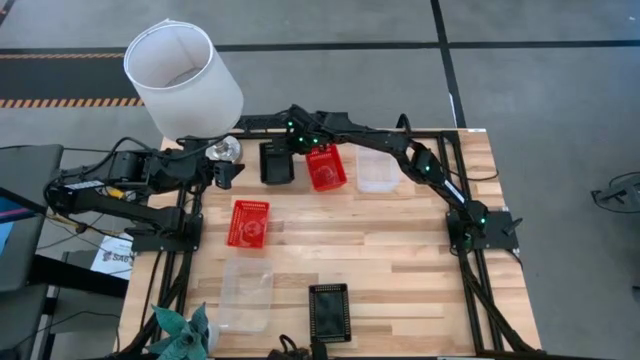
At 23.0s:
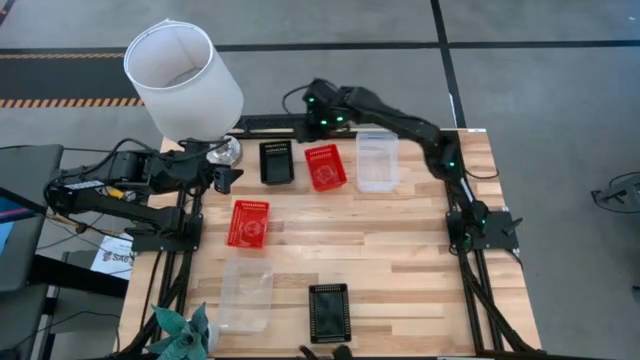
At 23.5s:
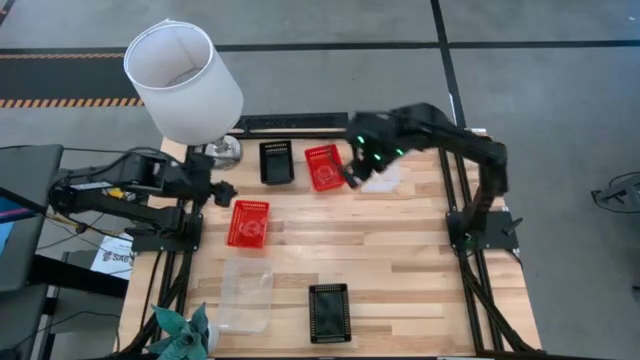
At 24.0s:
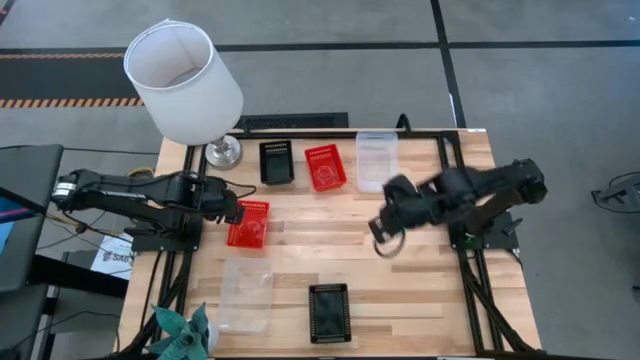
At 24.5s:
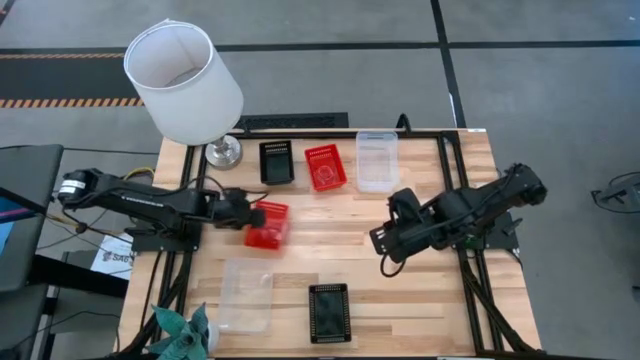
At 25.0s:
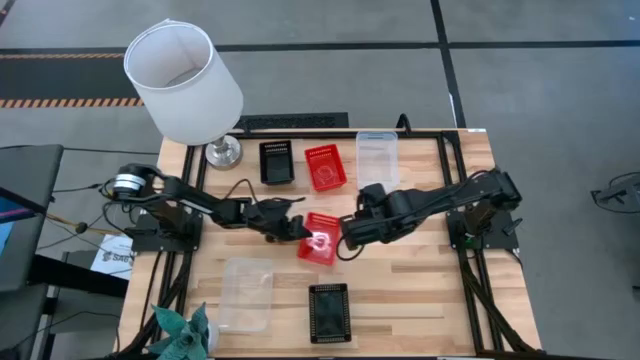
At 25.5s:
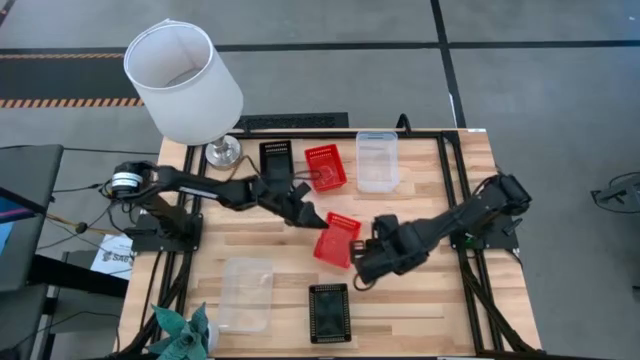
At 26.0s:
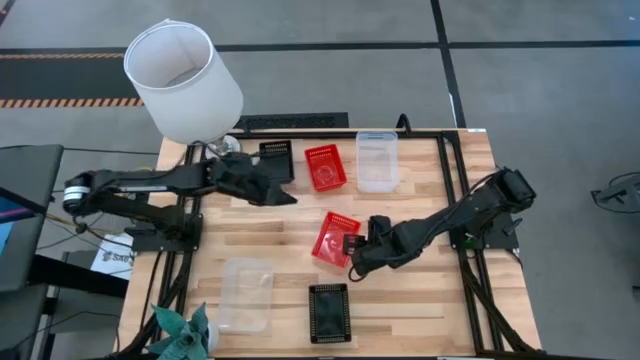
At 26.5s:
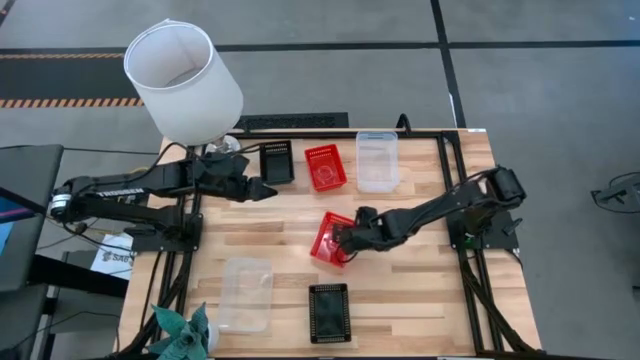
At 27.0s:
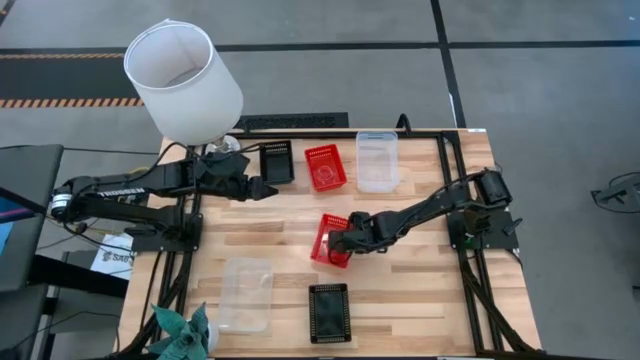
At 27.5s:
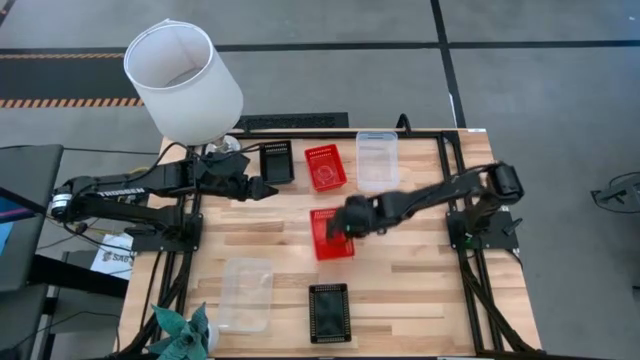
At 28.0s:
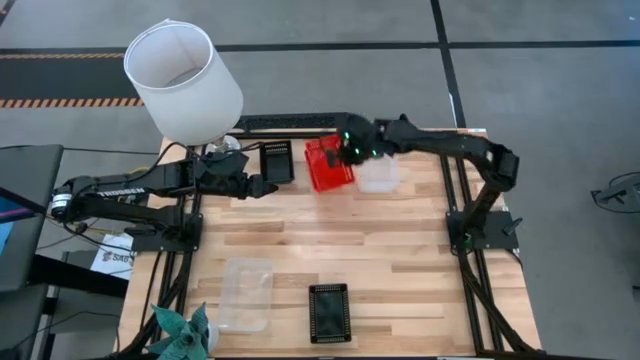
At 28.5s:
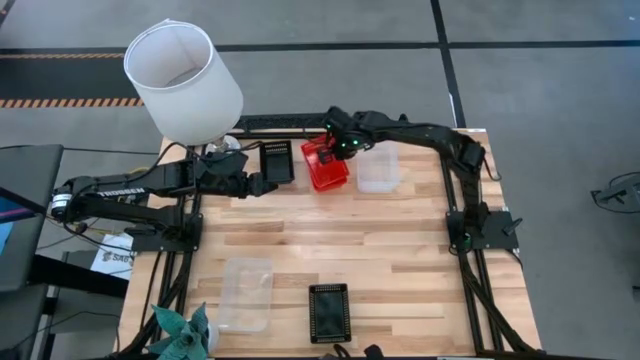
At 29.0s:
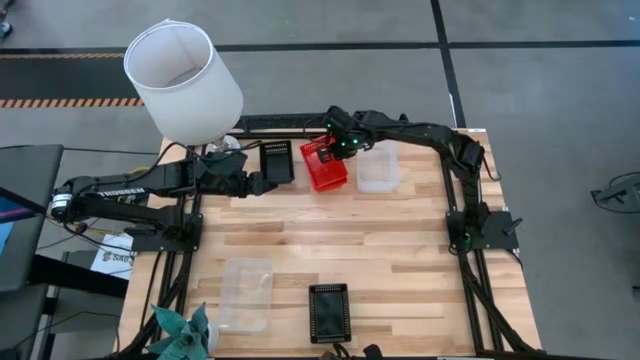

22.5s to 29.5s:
Stack the bottom red bin on the top red bin

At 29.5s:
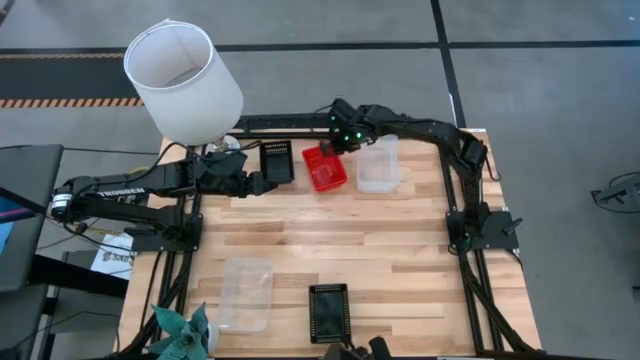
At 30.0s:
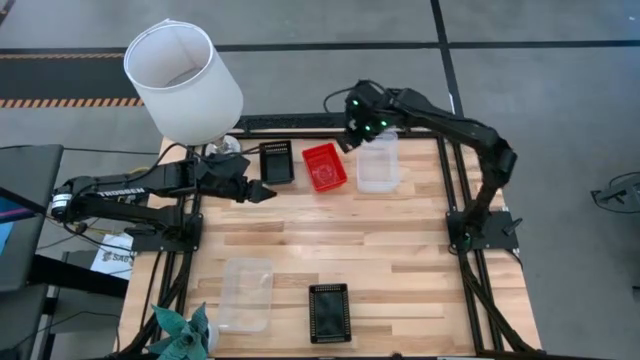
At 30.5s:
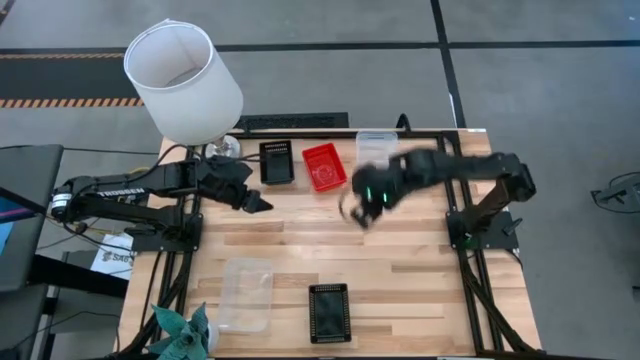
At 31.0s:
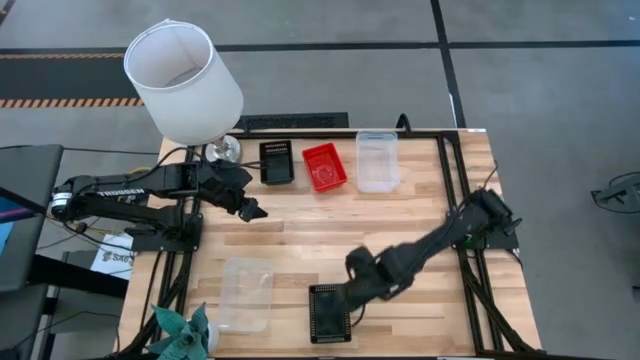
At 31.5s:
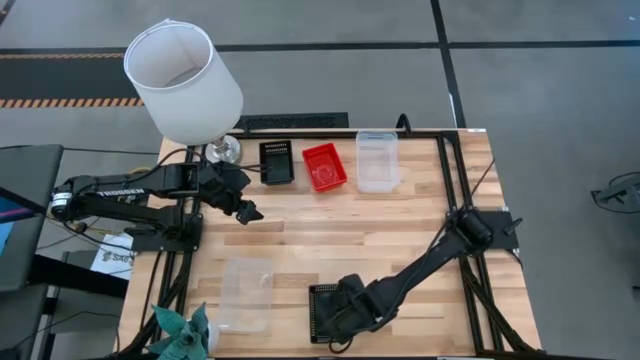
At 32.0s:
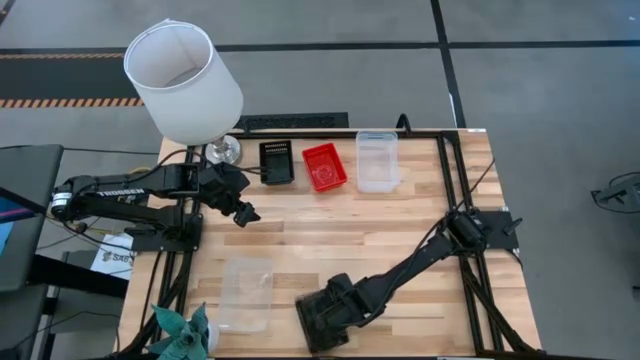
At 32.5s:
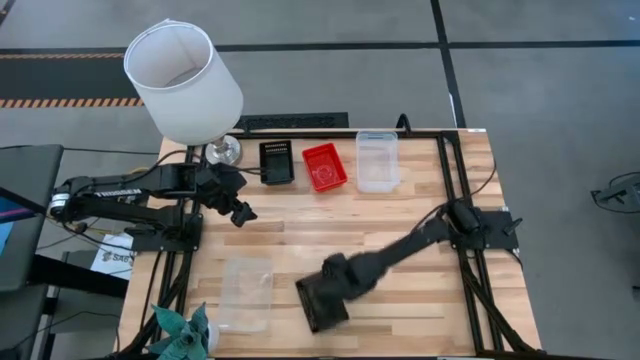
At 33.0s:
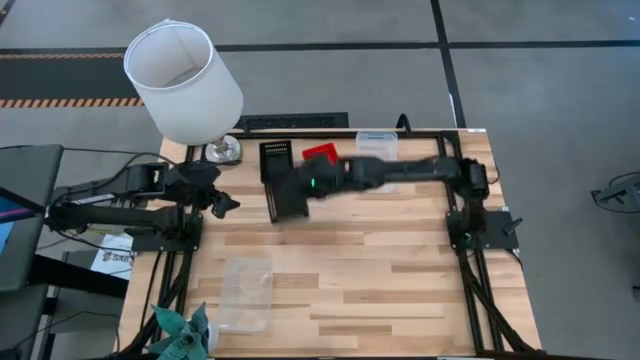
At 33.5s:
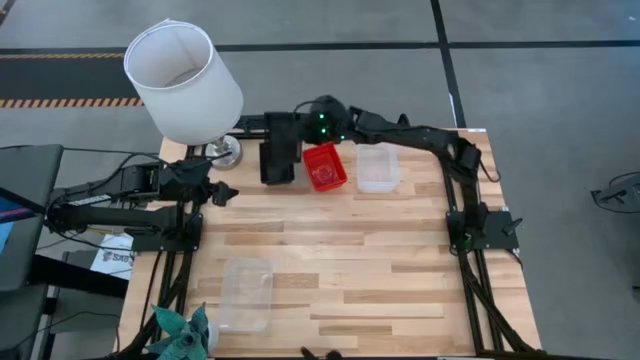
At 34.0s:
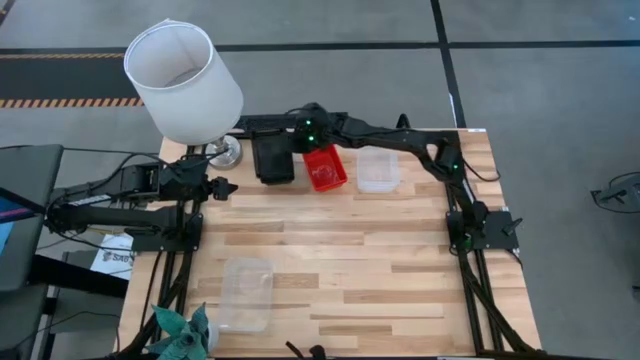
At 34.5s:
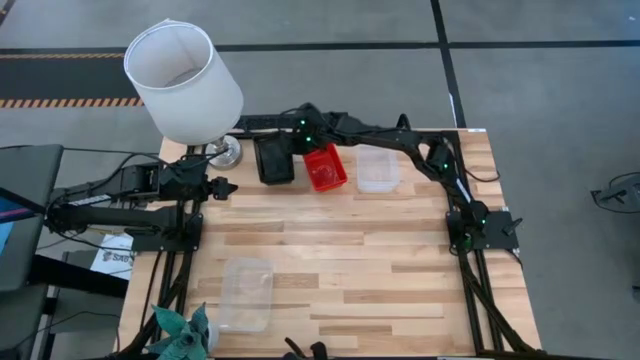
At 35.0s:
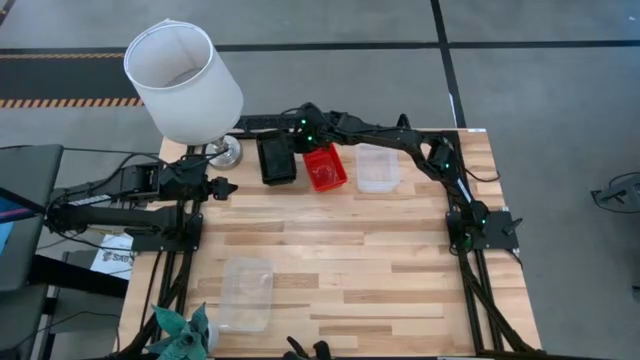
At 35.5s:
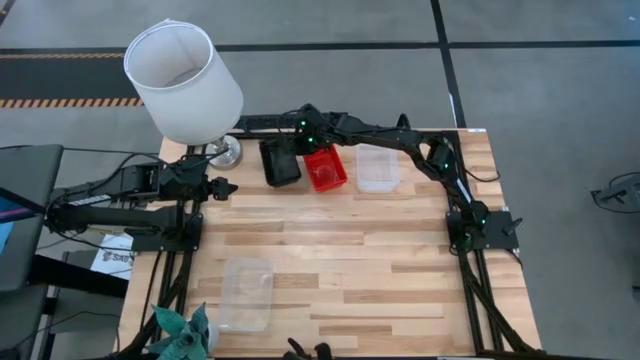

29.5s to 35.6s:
Stack the bottom black bin on the top black bin

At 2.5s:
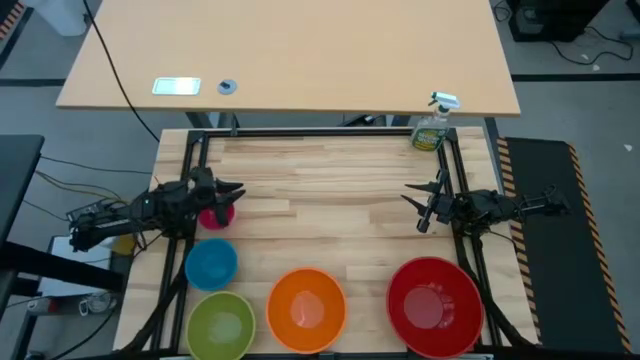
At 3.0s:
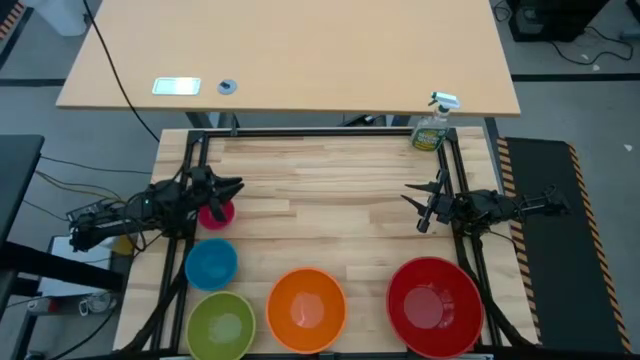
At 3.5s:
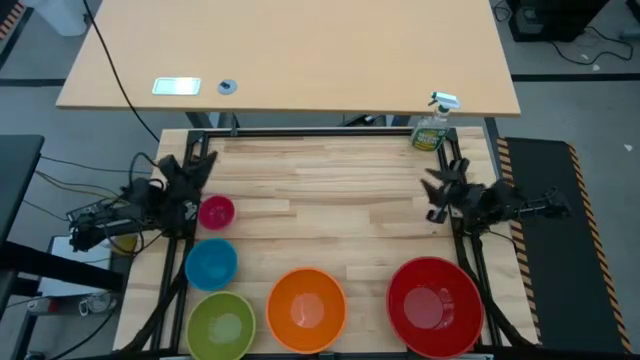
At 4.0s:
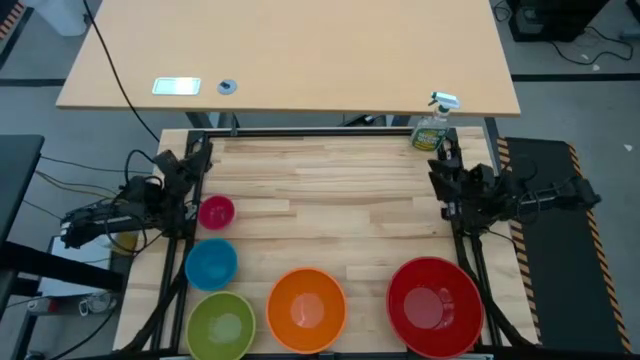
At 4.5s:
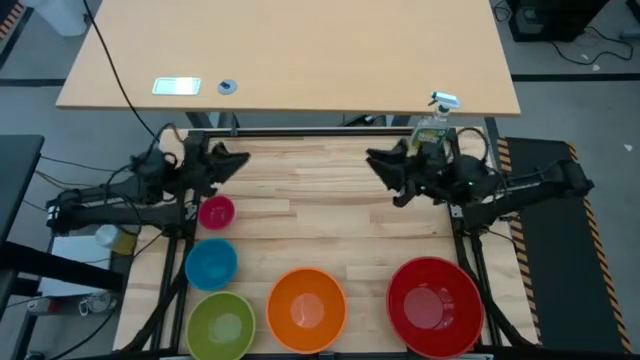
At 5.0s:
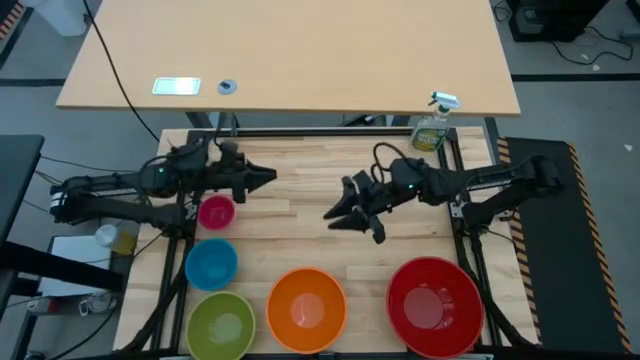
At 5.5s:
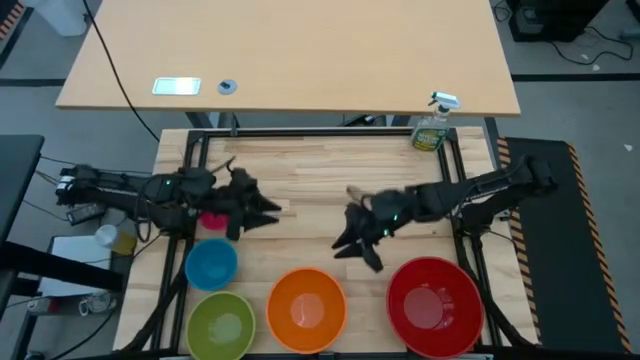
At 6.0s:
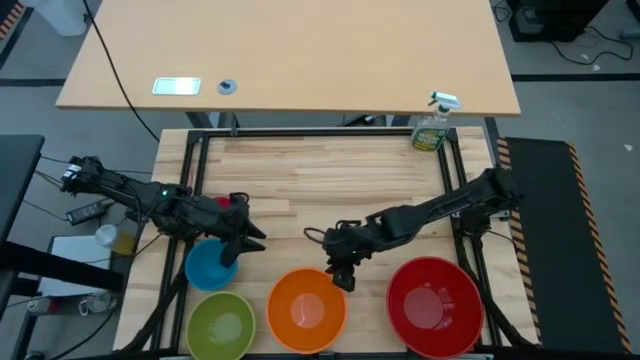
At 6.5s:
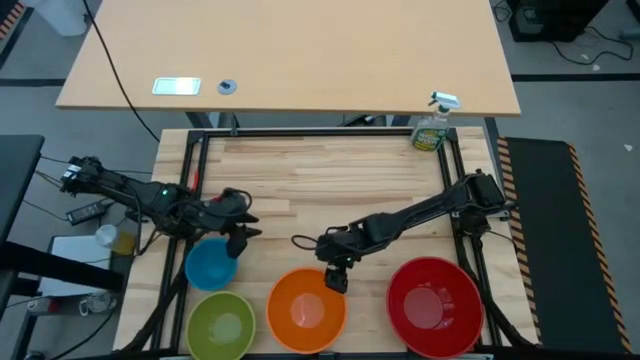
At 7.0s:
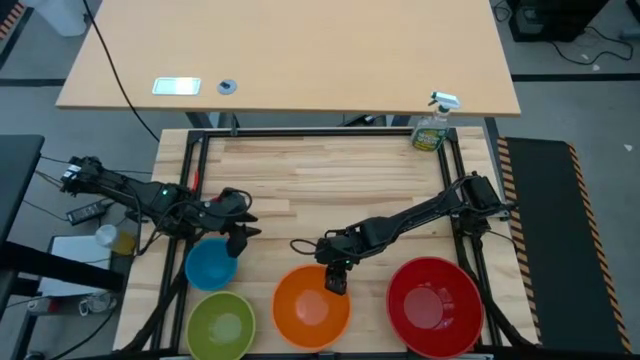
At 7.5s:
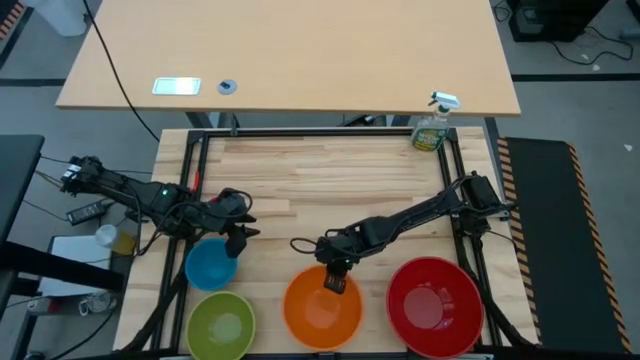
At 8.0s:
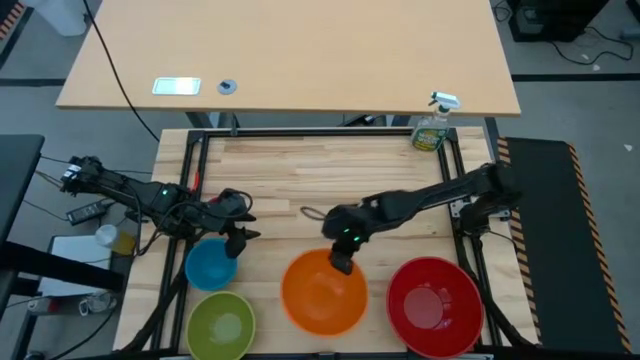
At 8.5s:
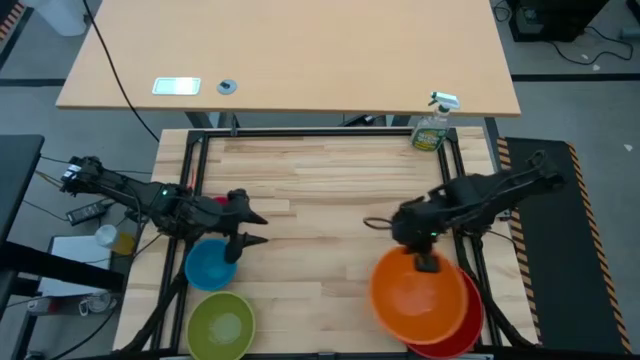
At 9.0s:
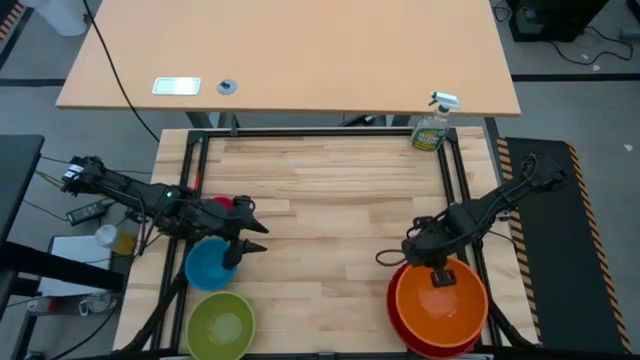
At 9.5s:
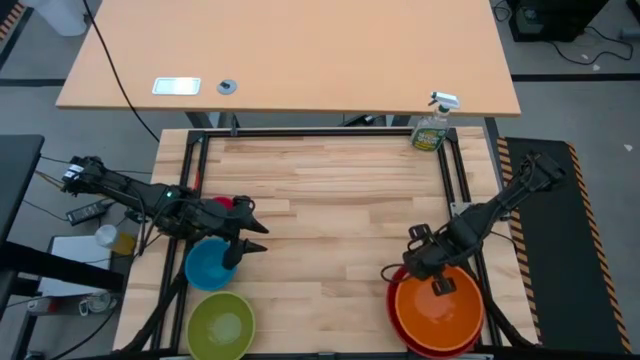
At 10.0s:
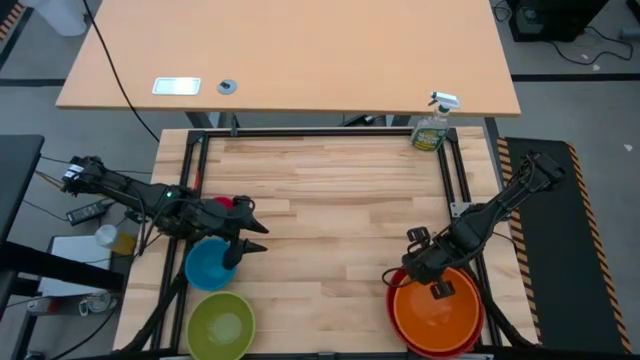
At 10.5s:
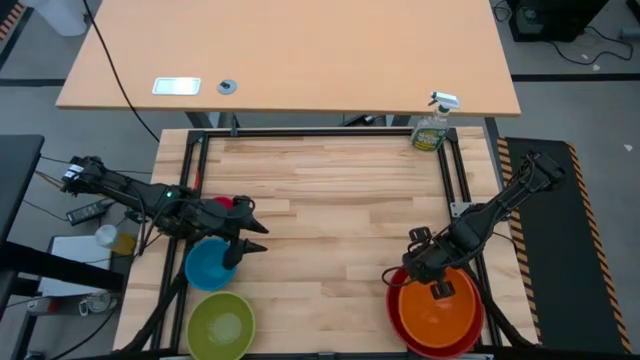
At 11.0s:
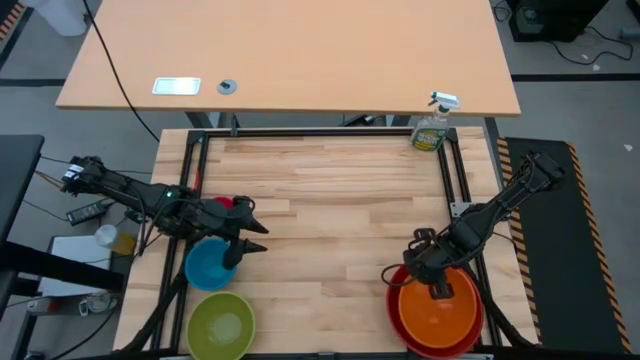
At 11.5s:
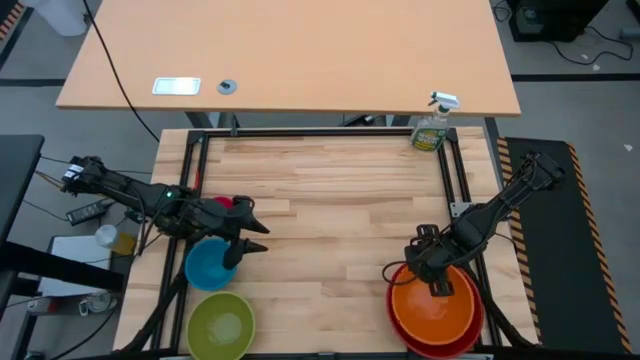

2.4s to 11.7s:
Stack the large orange bowl on top of the extra large red bowl
